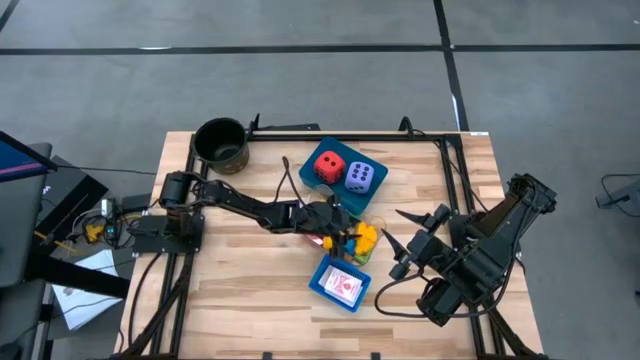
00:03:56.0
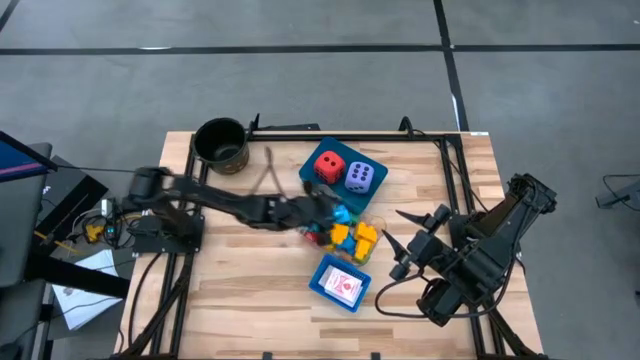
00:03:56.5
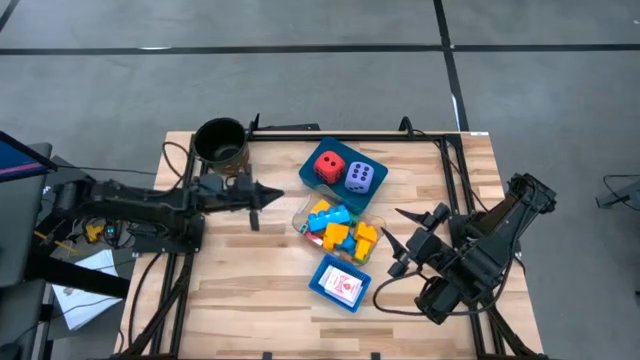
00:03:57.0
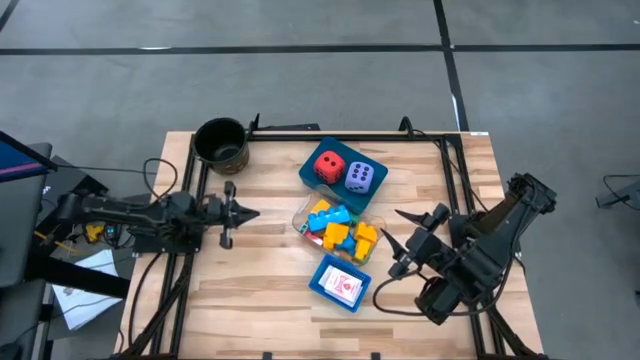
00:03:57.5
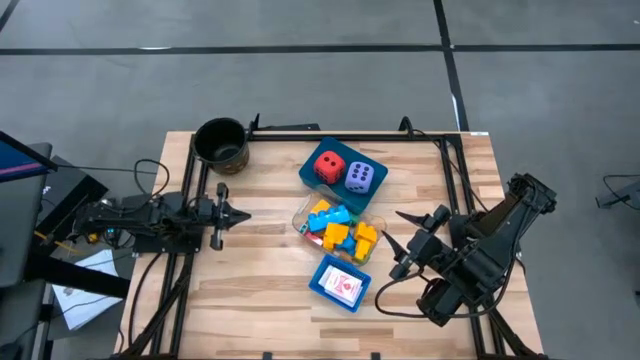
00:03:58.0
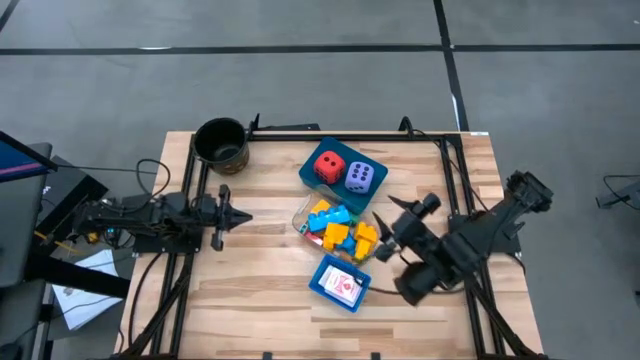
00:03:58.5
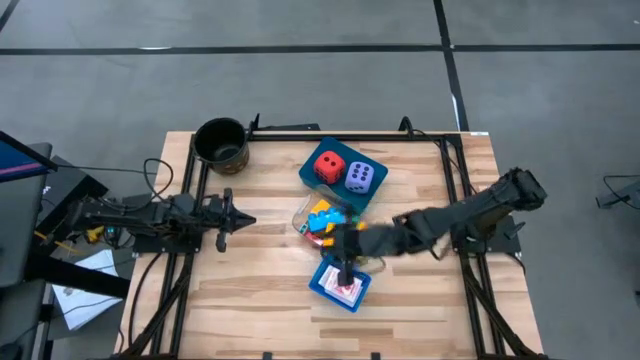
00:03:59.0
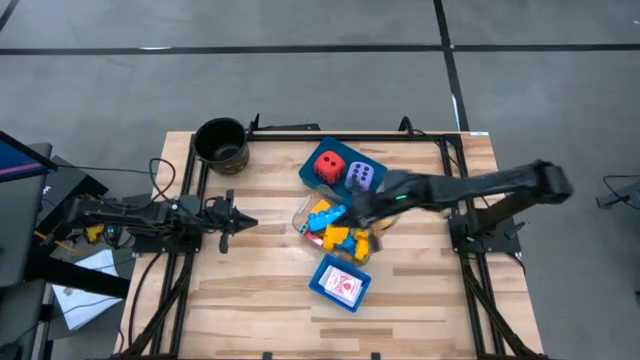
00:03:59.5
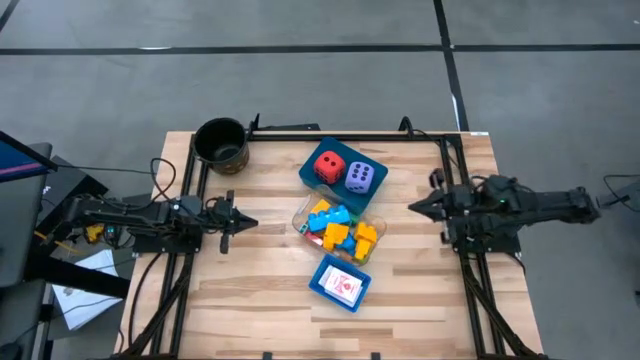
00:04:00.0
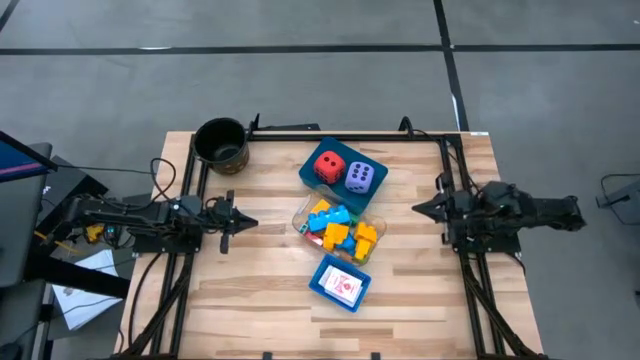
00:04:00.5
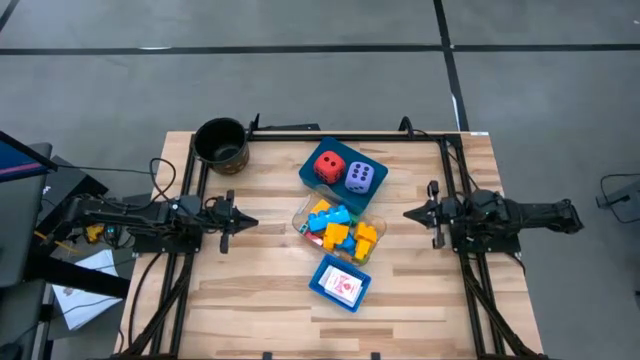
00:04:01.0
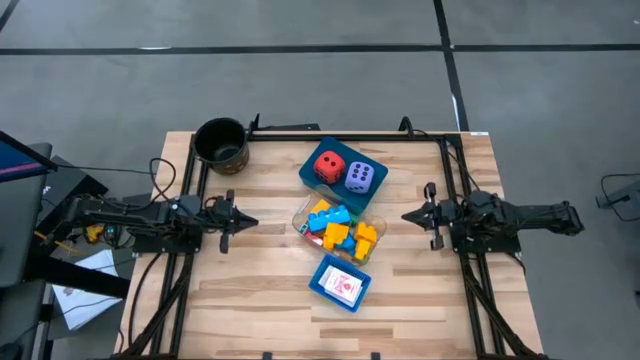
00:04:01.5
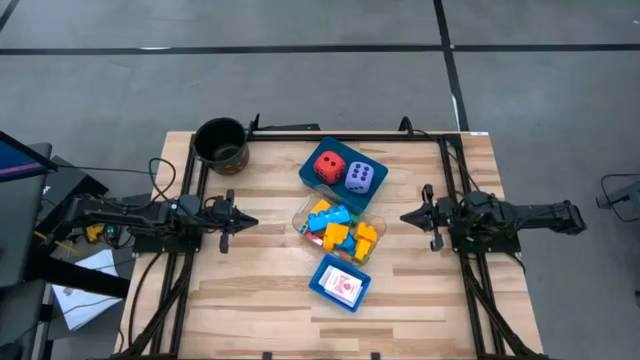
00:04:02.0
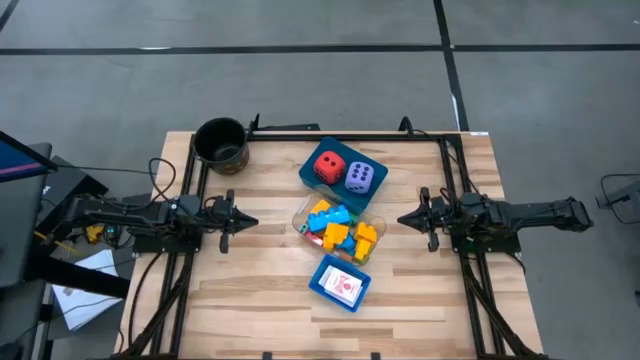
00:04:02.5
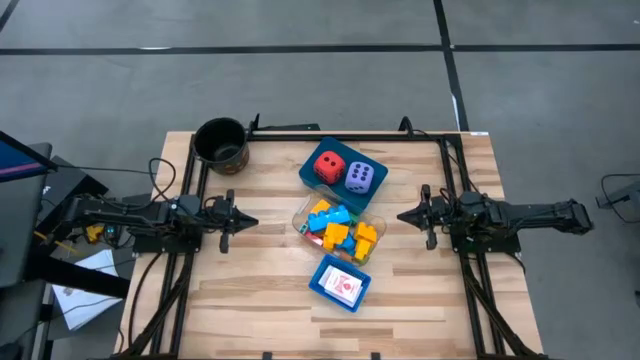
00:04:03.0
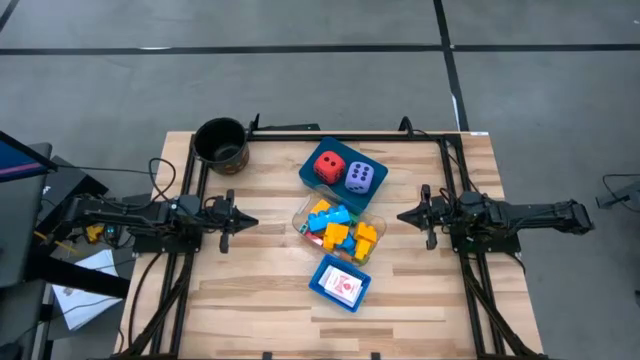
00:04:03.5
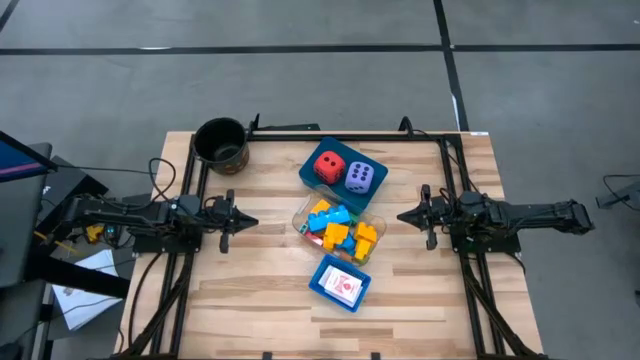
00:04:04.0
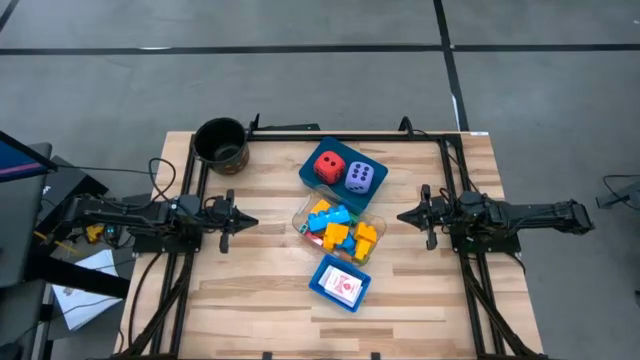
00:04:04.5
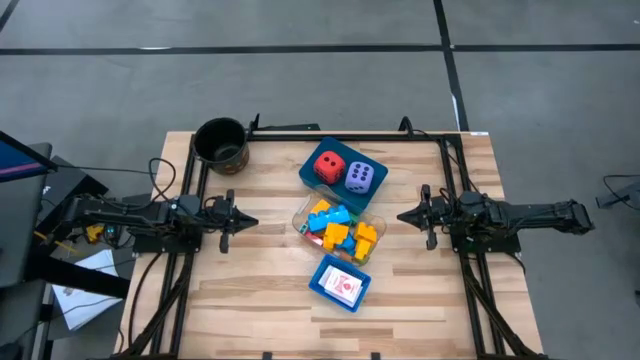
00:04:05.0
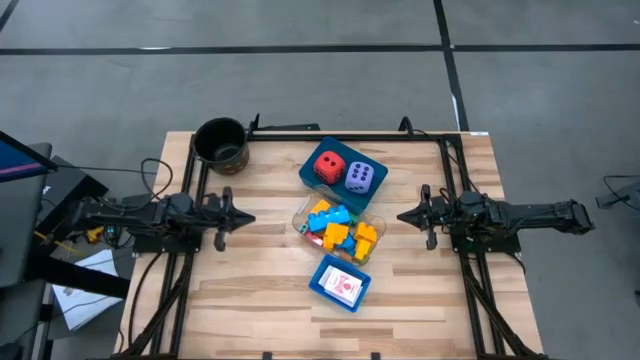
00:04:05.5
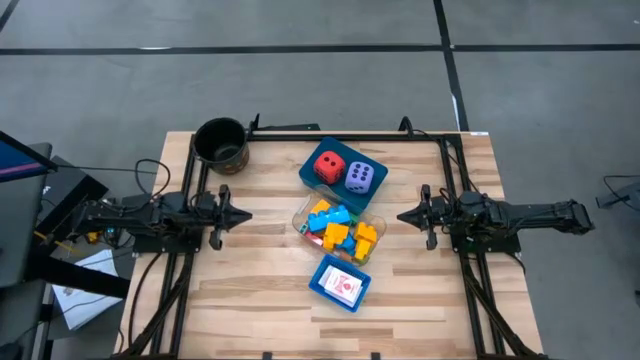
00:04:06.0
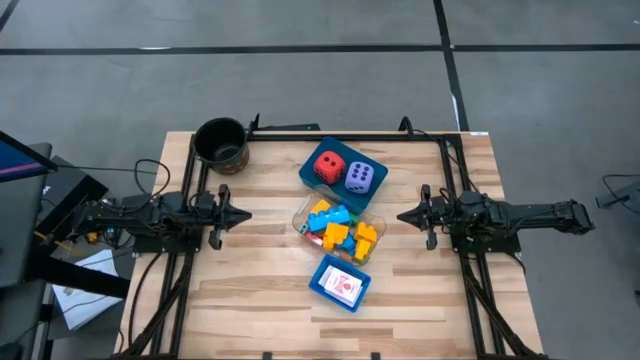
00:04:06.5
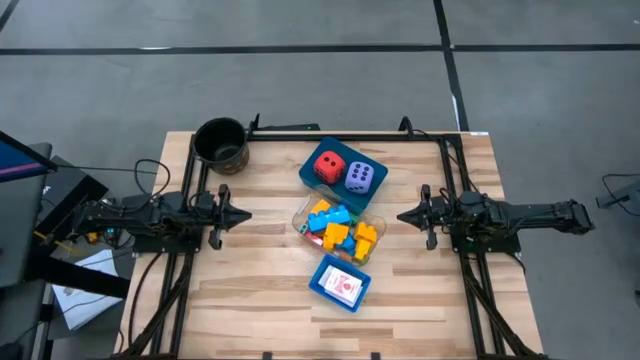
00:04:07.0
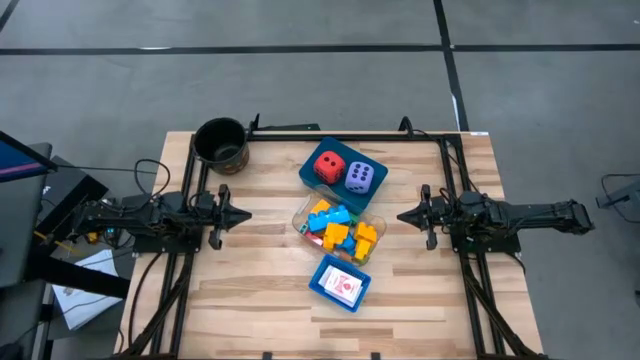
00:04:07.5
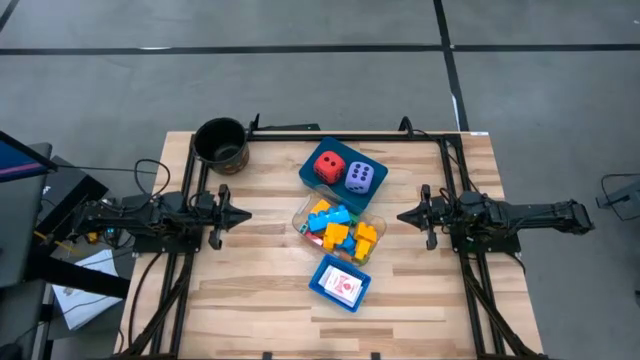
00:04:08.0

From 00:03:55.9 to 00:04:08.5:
Task: Pick & Place Toys
Return to Home Position

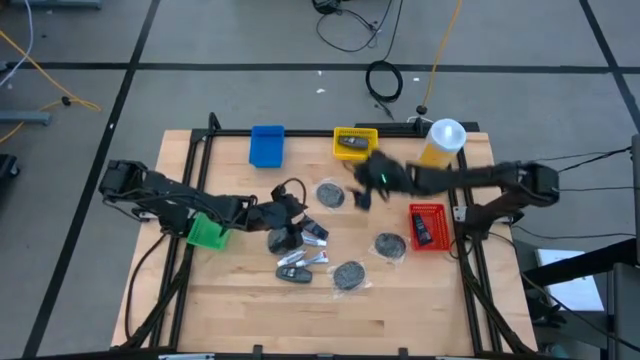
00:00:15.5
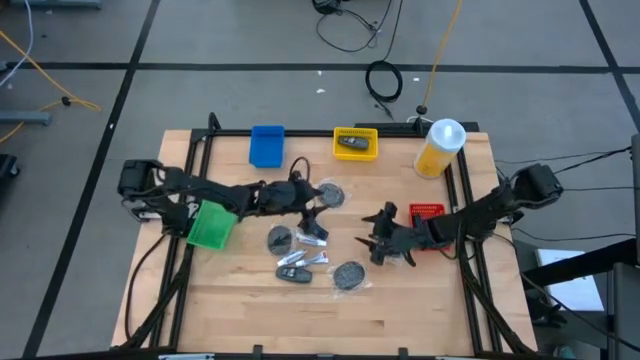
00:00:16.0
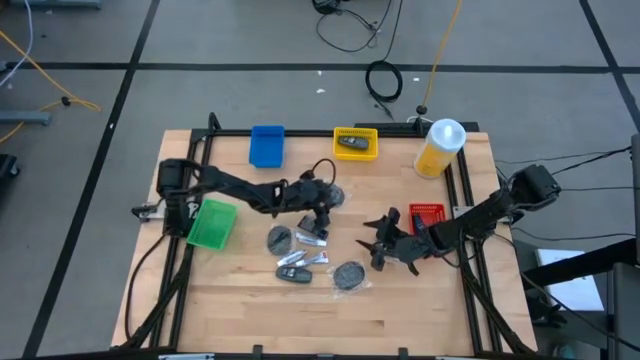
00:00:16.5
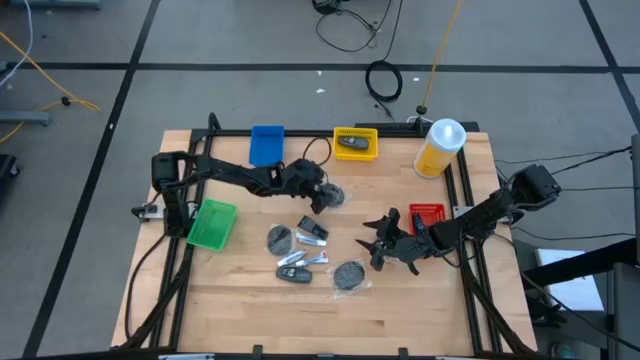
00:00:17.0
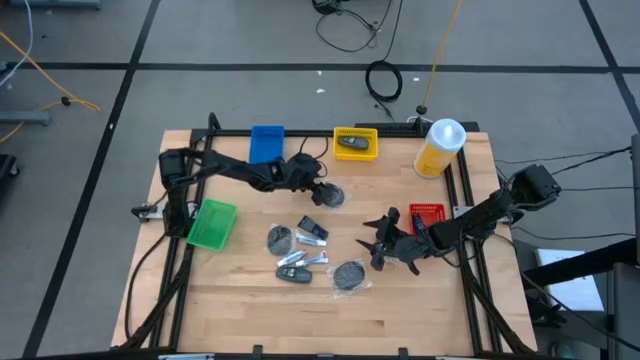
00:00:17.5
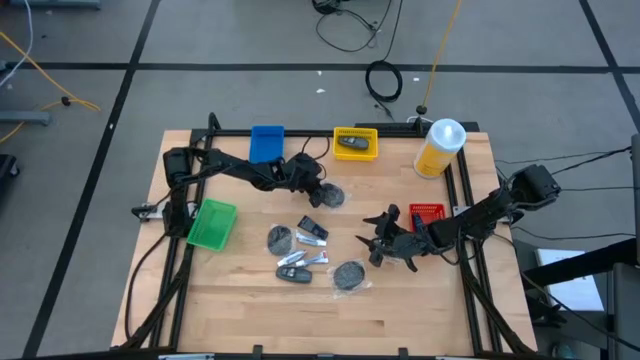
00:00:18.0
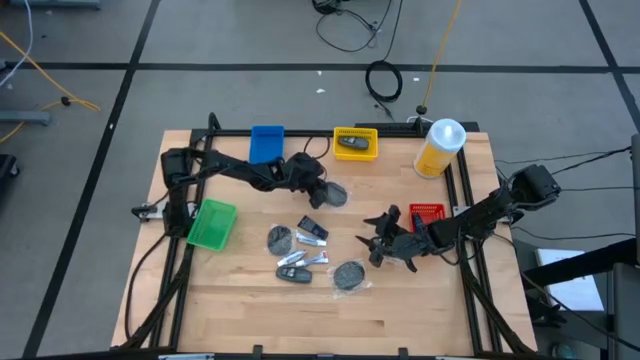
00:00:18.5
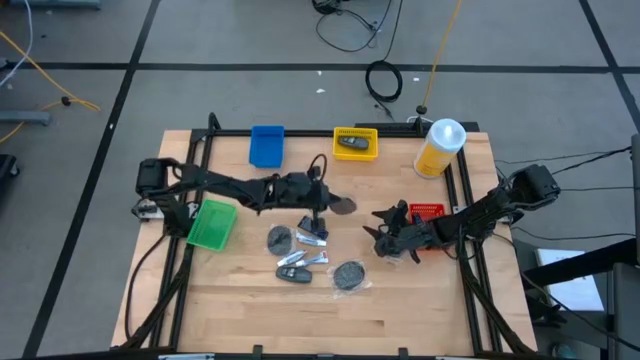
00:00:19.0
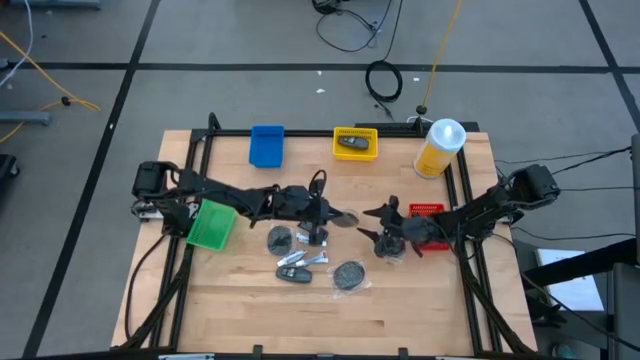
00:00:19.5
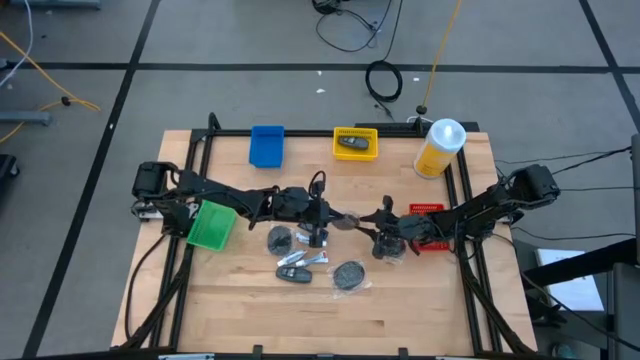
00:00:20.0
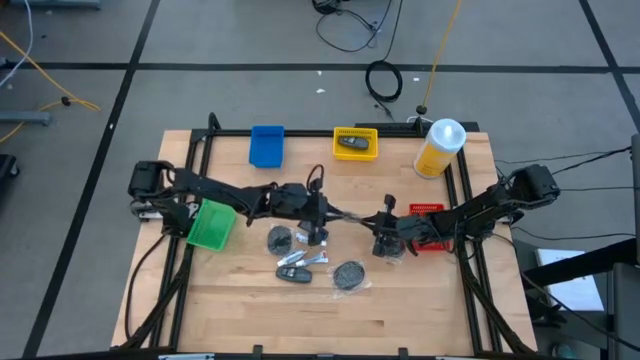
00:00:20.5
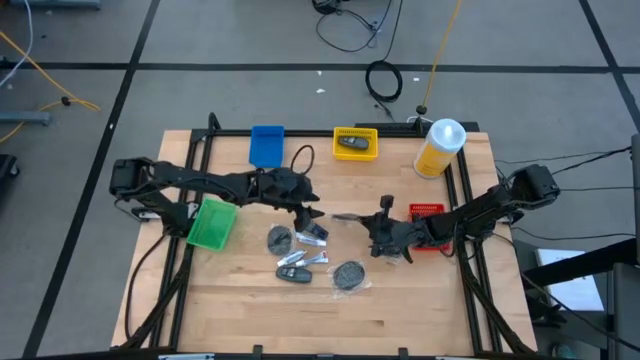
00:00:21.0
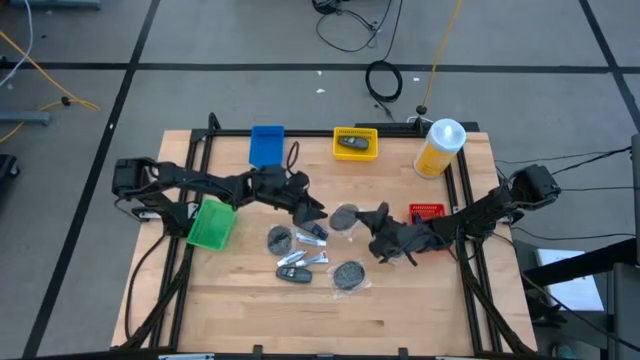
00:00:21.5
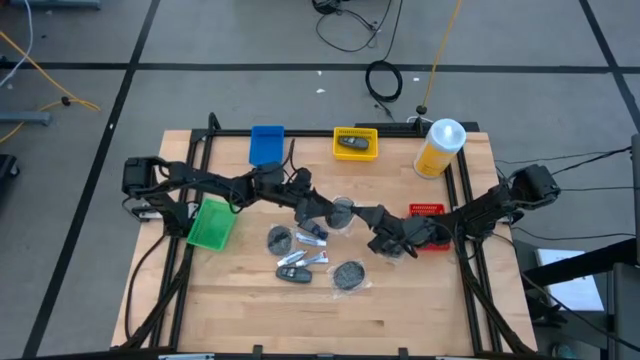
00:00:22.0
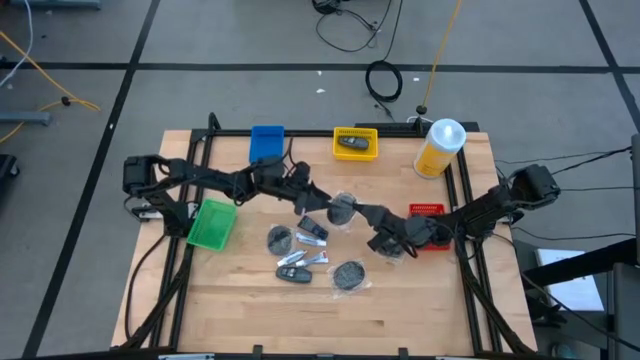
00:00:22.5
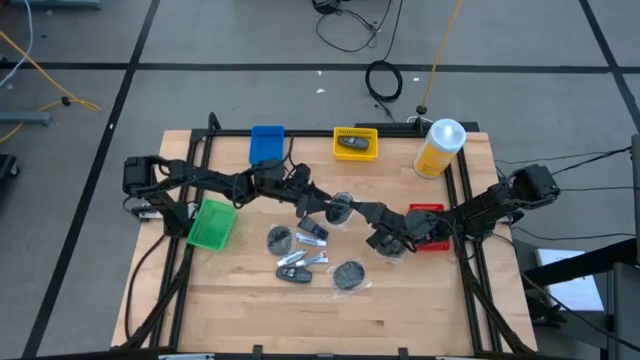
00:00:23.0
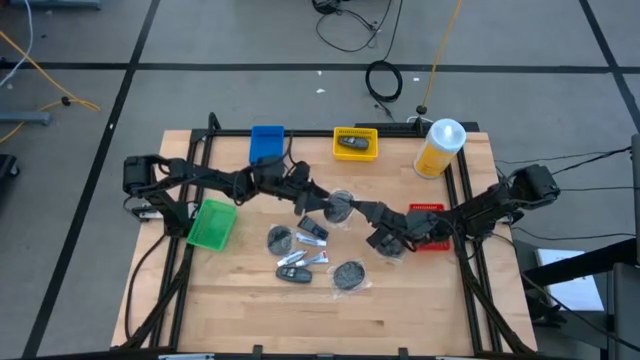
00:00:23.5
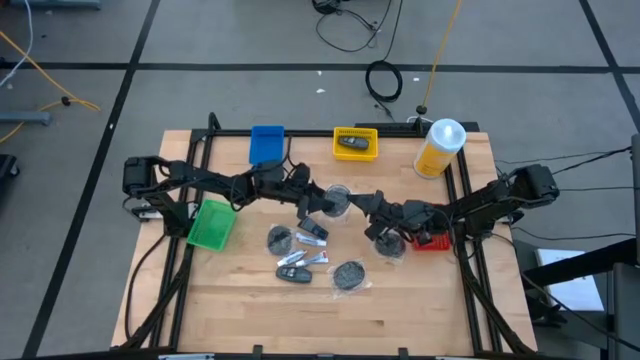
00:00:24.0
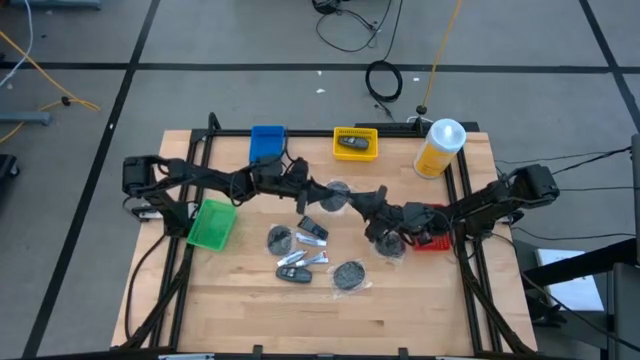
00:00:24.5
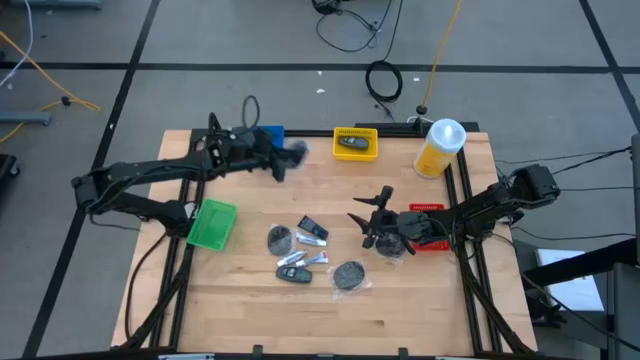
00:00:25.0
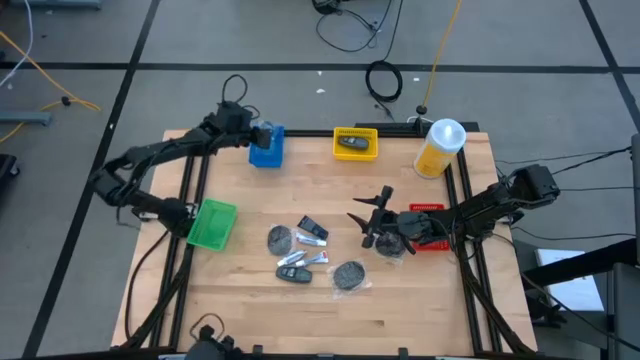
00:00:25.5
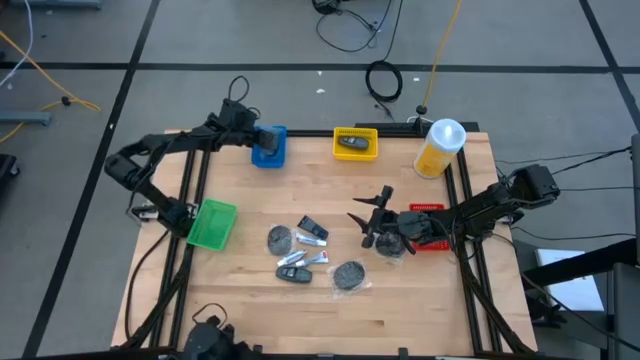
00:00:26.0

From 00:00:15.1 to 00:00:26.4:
Task: Pick & Place Travel size toiletries
Put the black hairbrush into the blue bin
